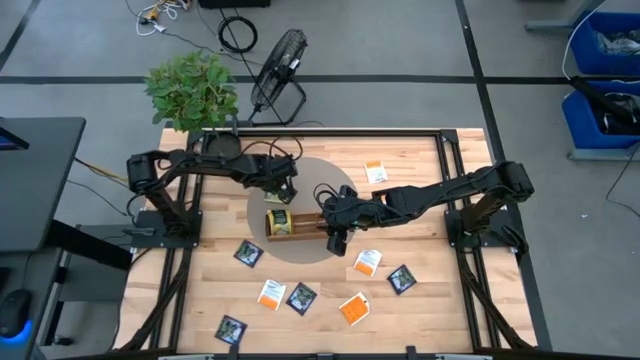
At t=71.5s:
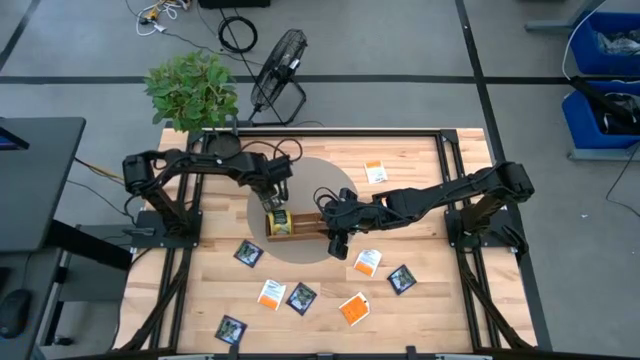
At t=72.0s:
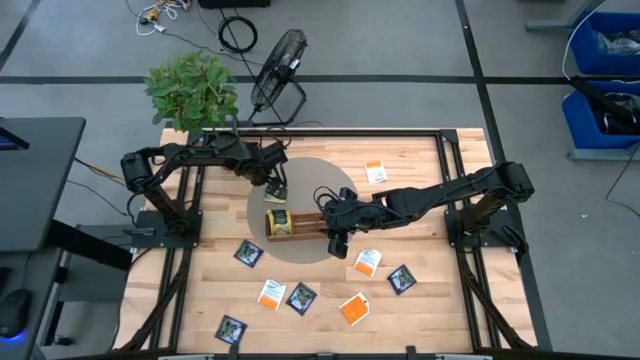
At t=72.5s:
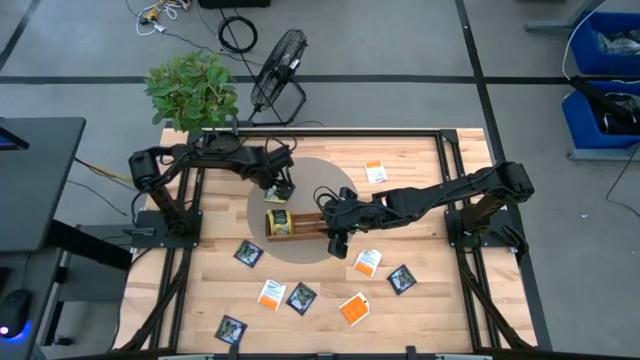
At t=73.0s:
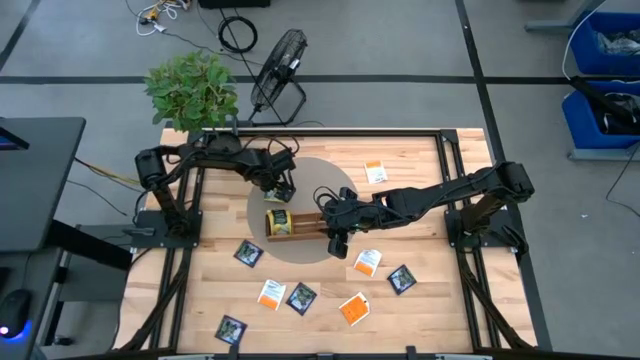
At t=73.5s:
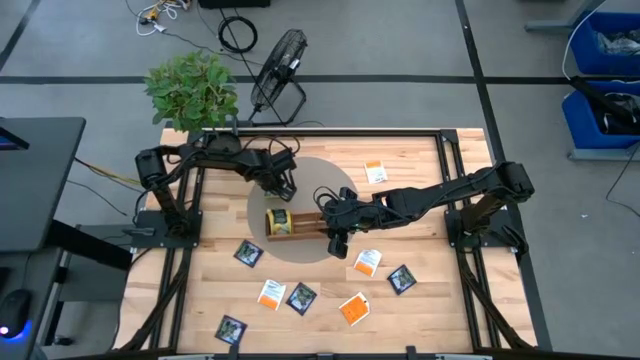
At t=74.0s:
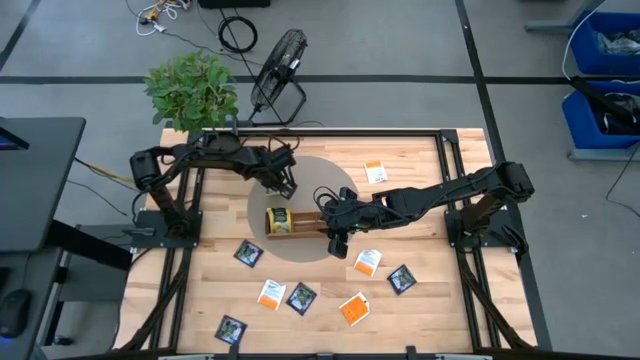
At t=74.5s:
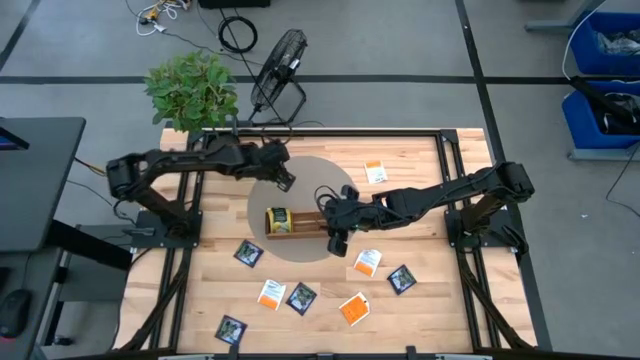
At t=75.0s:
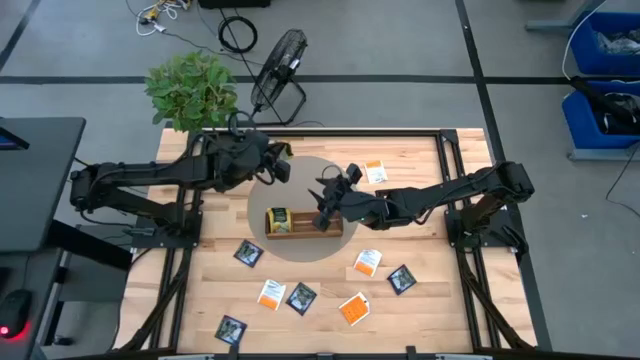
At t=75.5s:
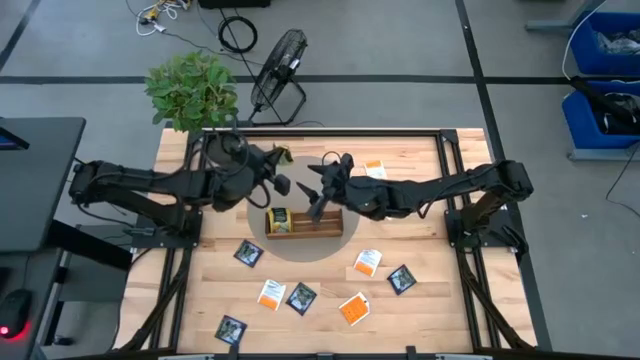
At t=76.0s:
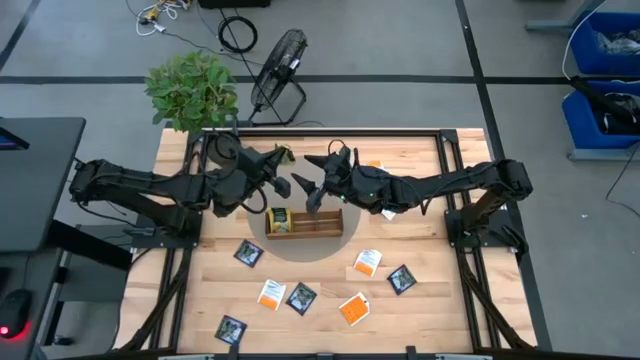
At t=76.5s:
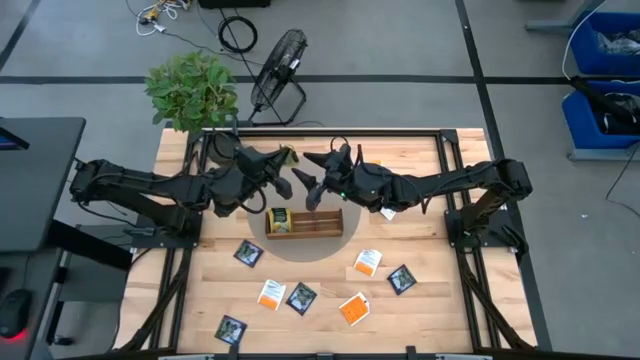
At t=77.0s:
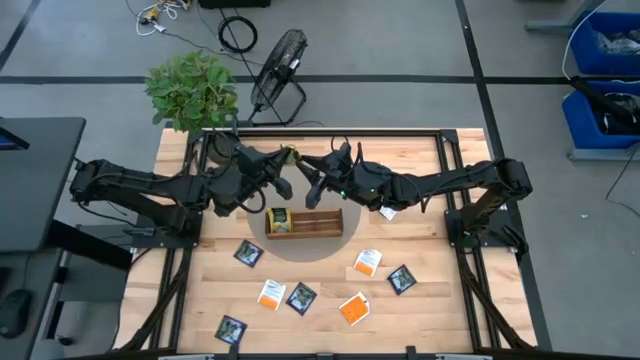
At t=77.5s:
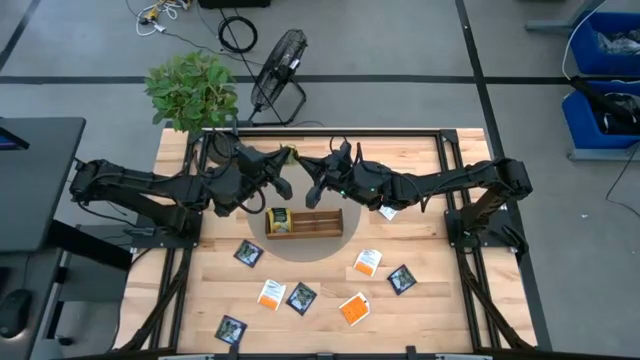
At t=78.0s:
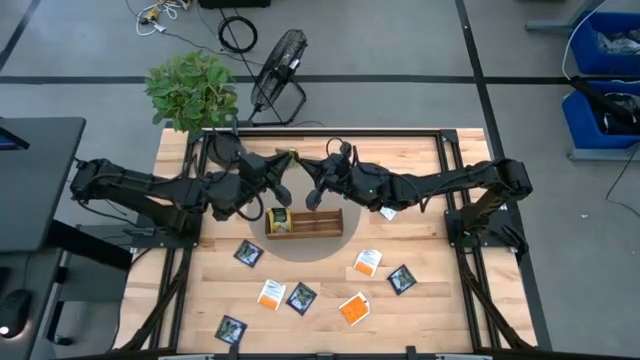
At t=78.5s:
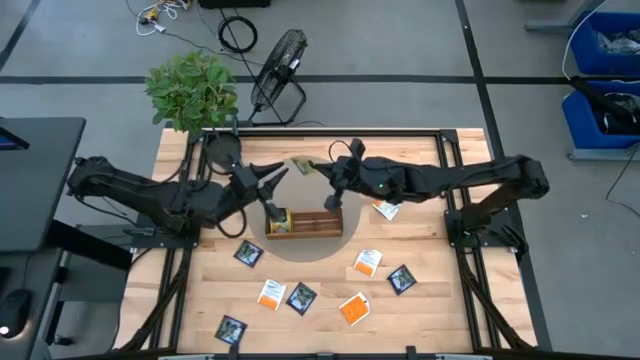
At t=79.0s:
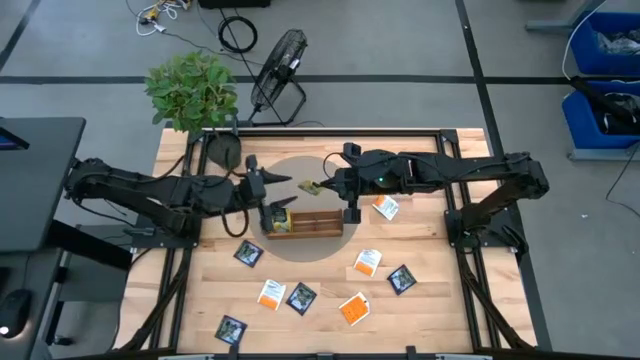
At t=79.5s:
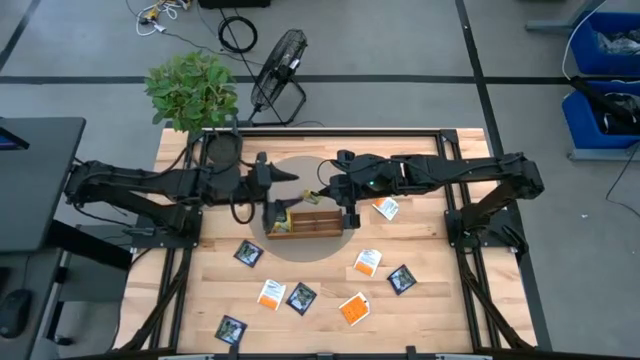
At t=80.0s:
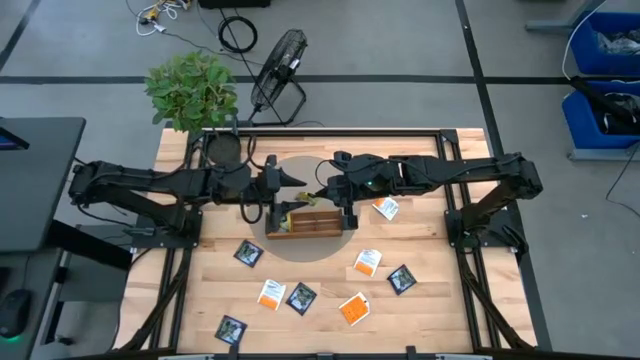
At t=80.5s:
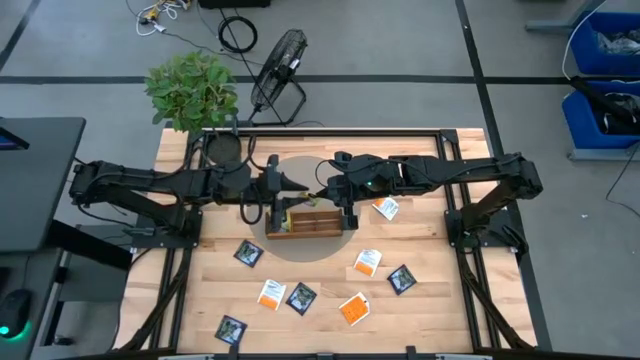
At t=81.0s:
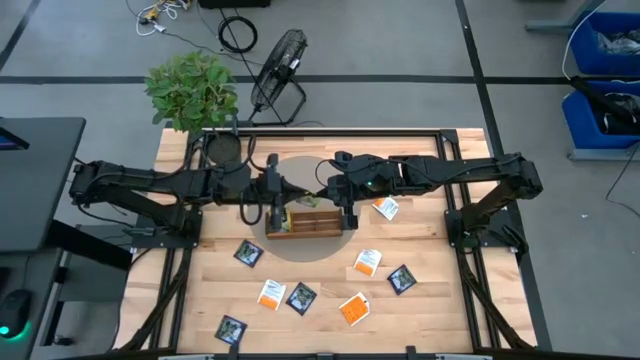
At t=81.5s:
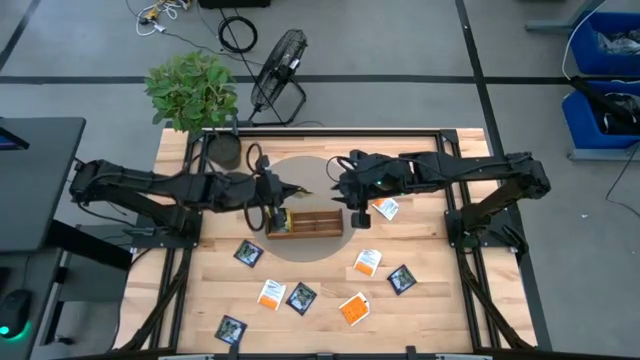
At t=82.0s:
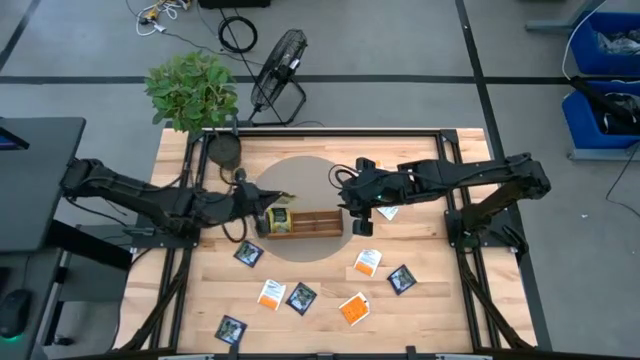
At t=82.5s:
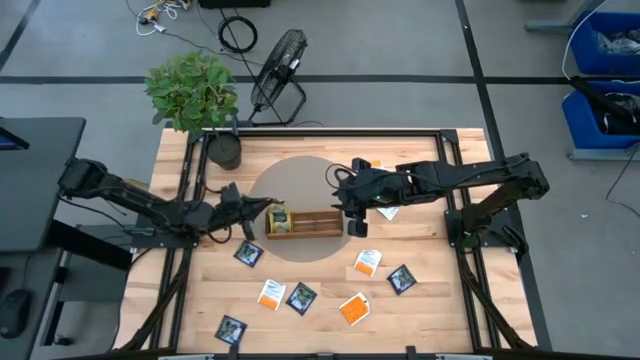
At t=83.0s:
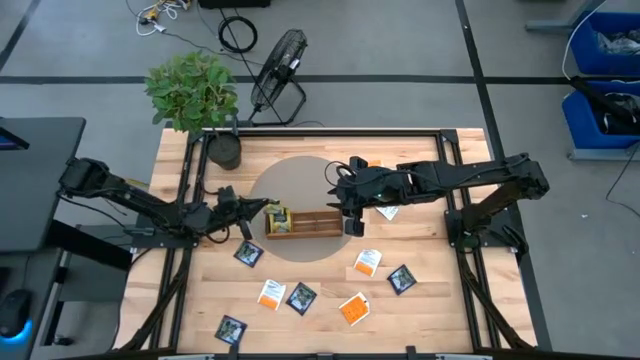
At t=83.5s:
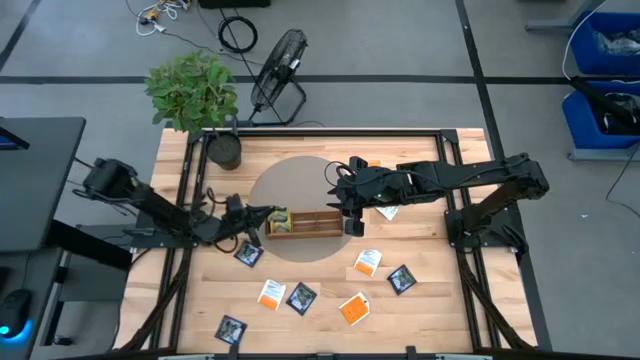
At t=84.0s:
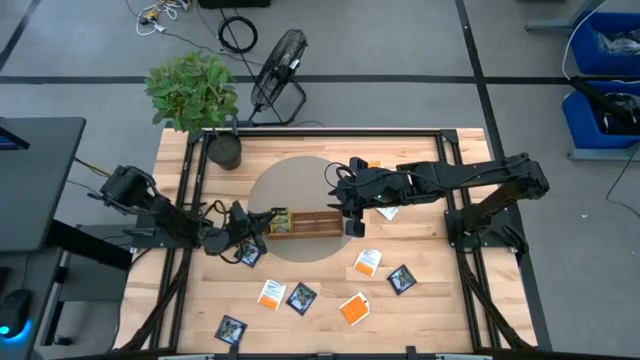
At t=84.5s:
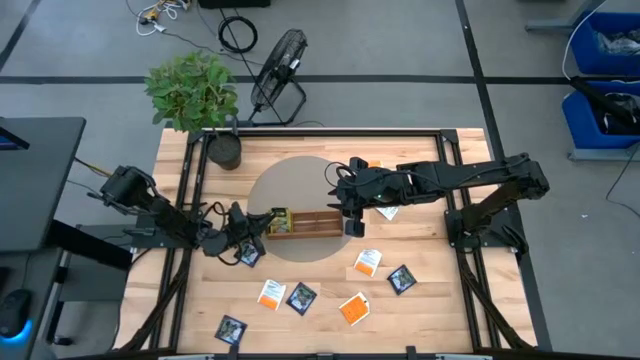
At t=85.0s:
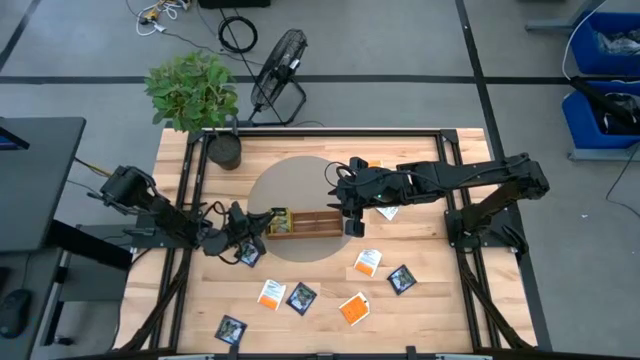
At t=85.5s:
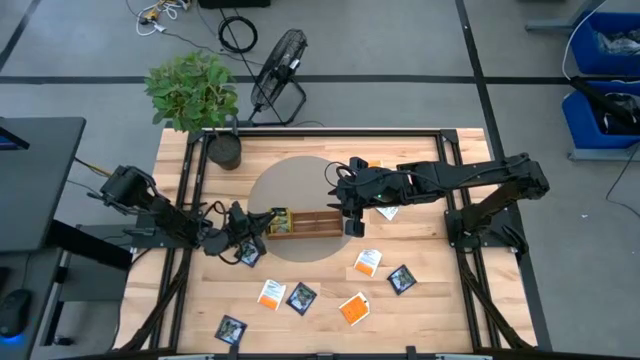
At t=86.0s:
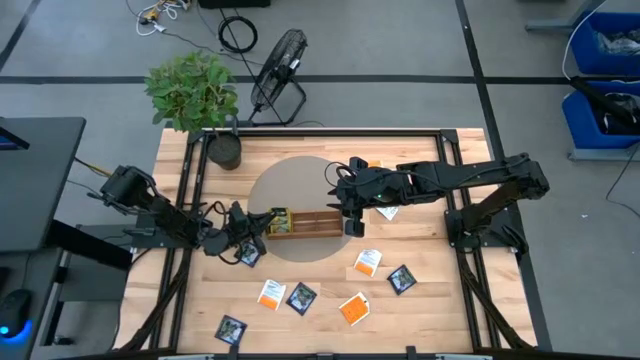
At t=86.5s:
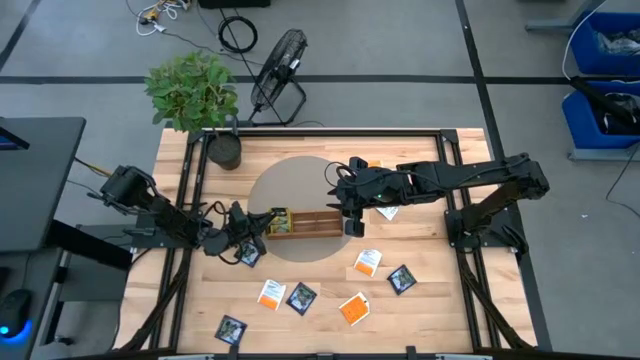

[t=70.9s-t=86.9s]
Task: Pick & Place Tea
Put the yellow tea bag into the wooden organizer

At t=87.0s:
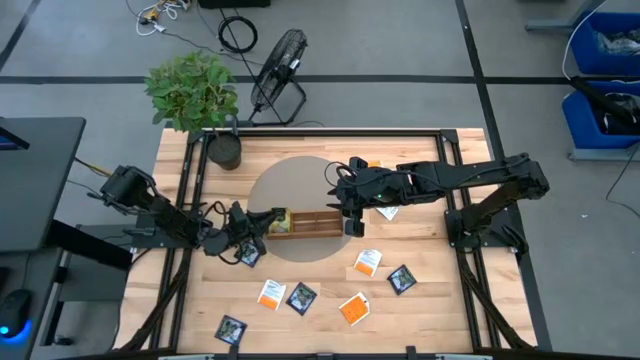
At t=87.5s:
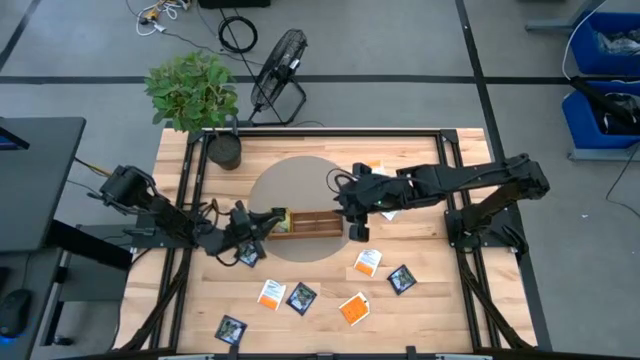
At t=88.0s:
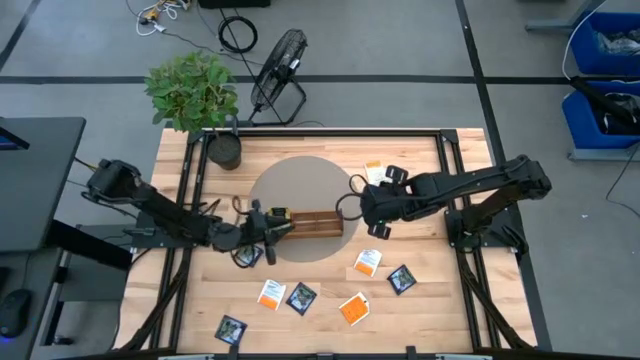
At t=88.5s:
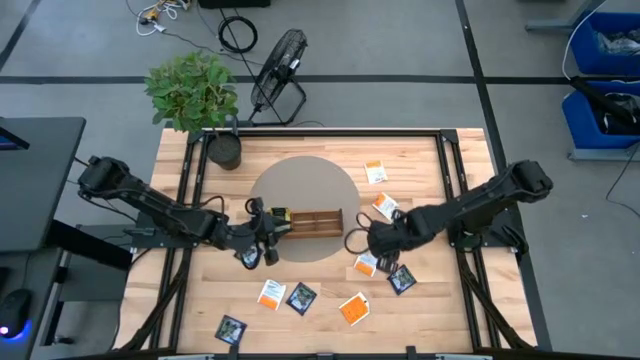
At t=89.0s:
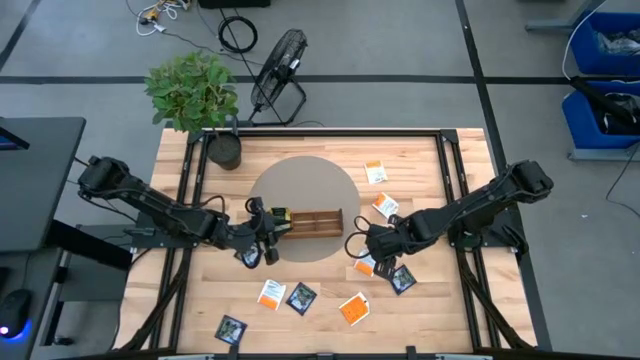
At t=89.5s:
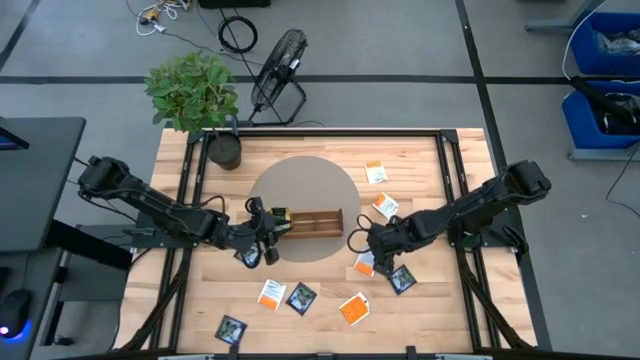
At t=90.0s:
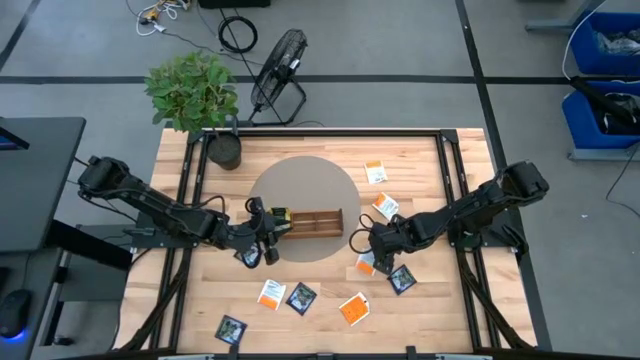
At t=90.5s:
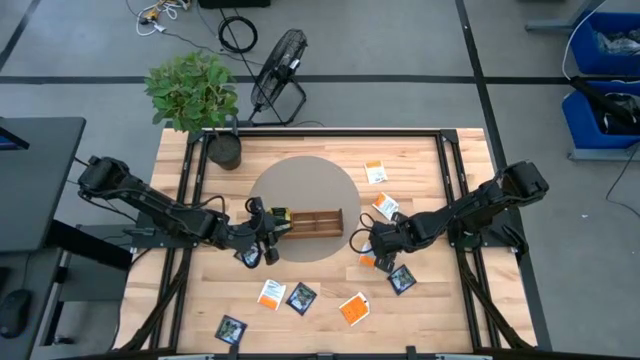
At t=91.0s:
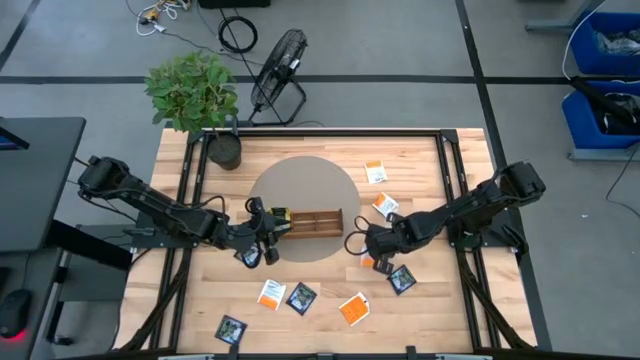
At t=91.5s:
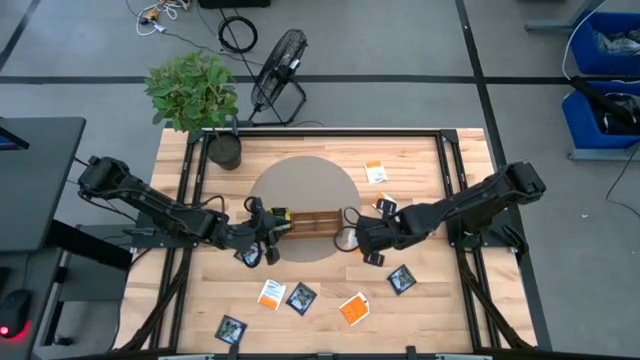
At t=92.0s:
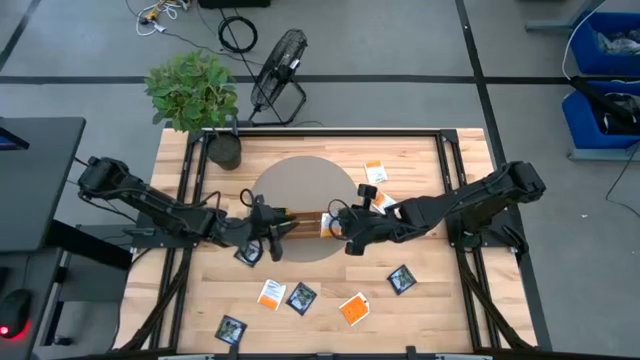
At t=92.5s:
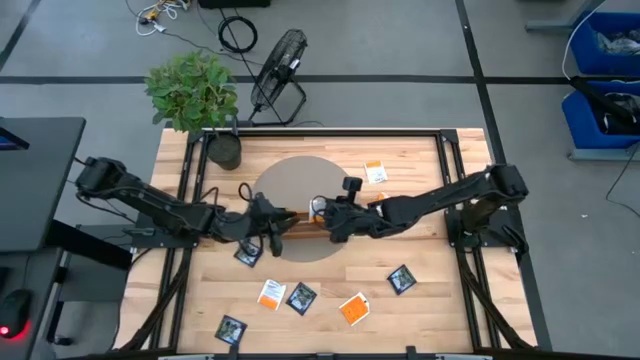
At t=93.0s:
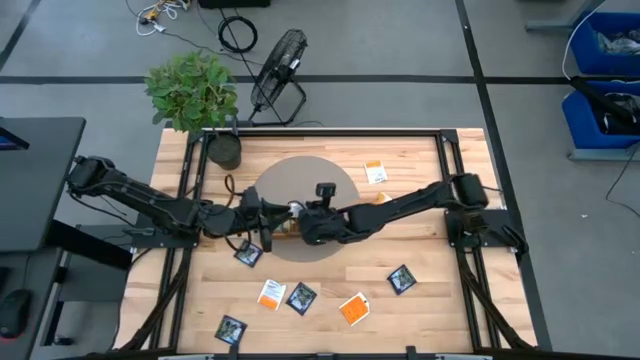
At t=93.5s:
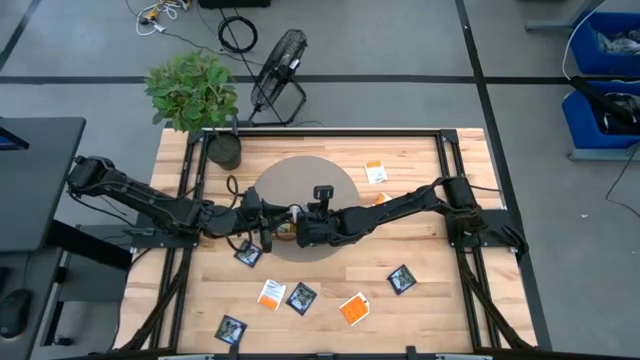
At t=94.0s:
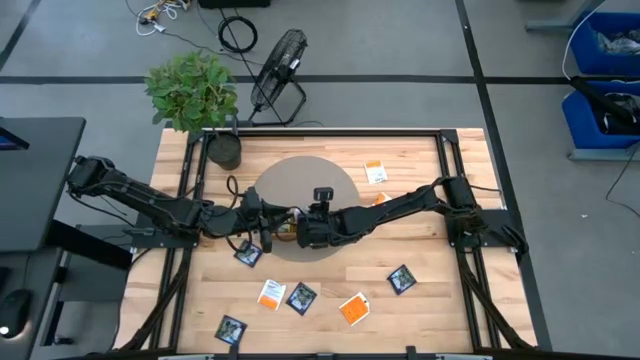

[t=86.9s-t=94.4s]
Put the orange tea bag into the wooden organizer
